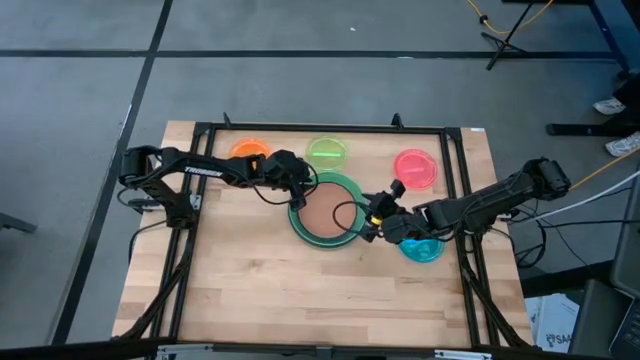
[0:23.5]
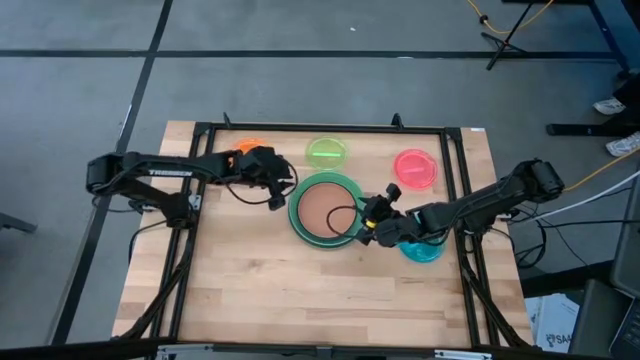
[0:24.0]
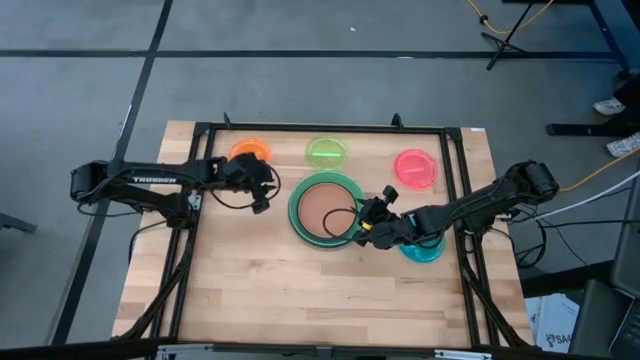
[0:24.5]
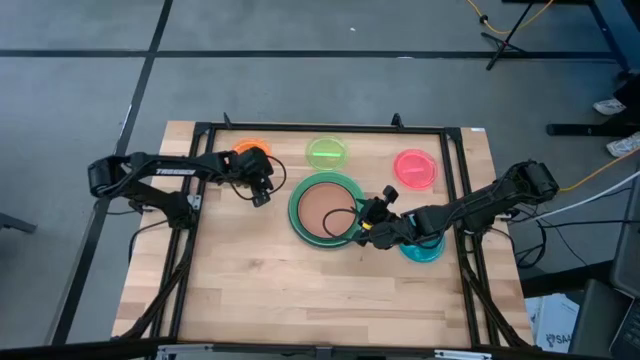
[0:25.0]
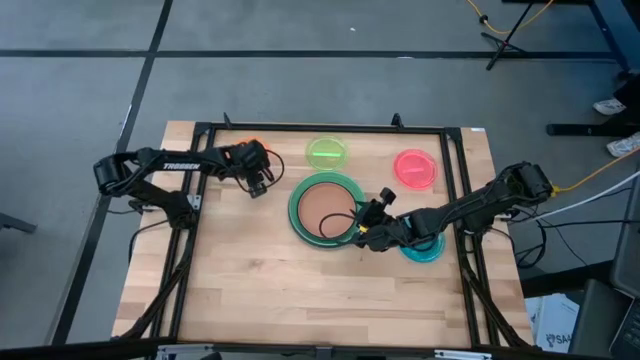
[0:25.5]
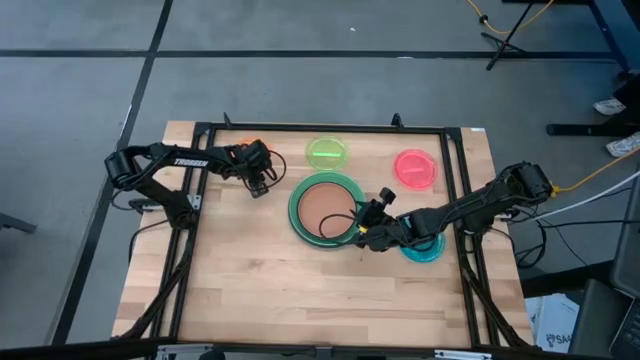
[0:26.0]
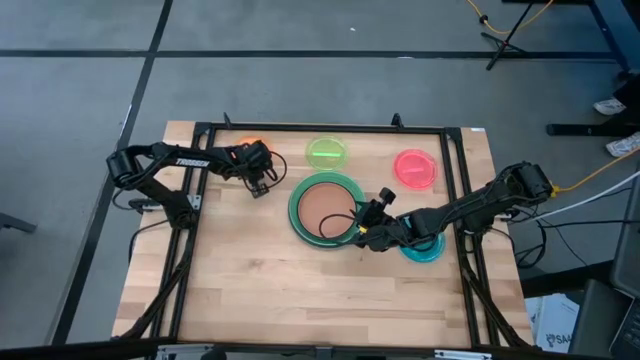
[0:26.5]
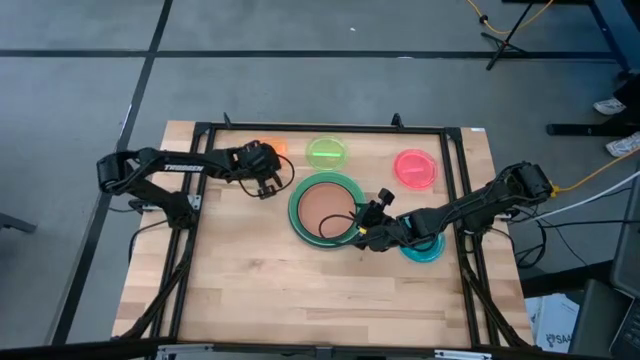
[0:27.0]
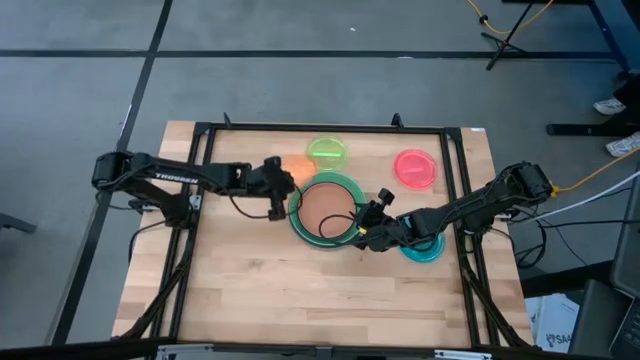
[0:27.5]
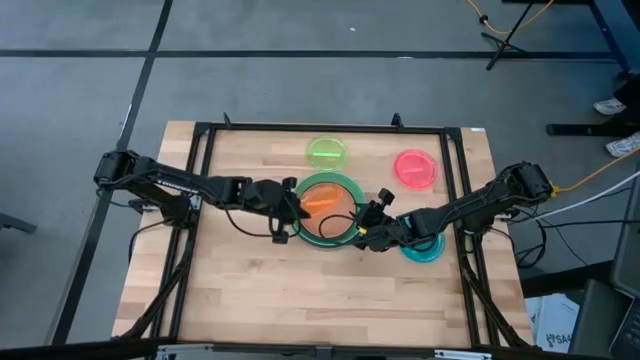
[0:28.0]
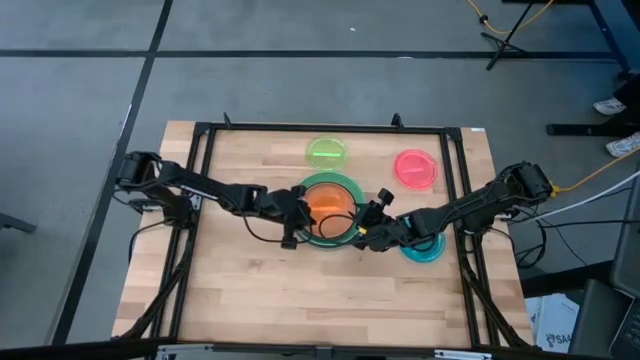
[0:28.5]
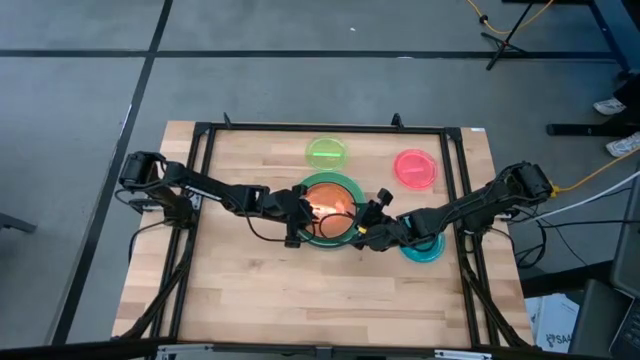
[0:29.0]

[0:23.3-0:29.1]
Task: Stack plastic plates
Stack the orange plate on top of the brown plate

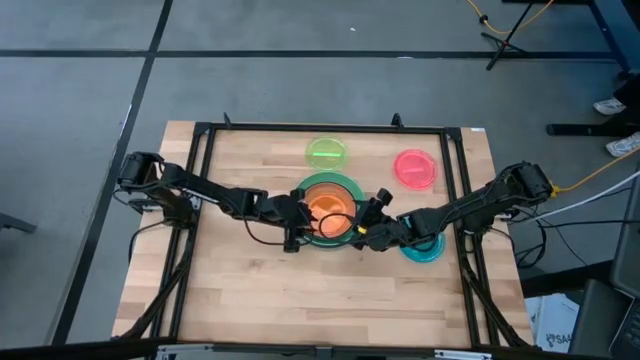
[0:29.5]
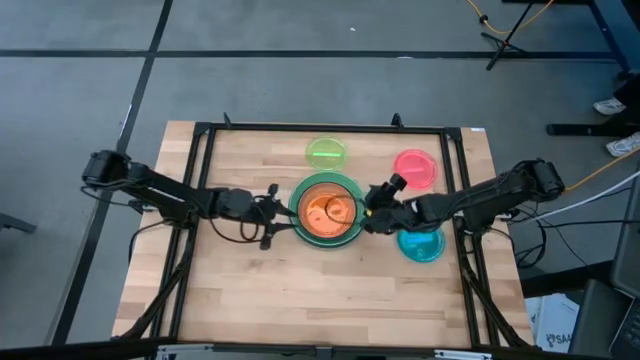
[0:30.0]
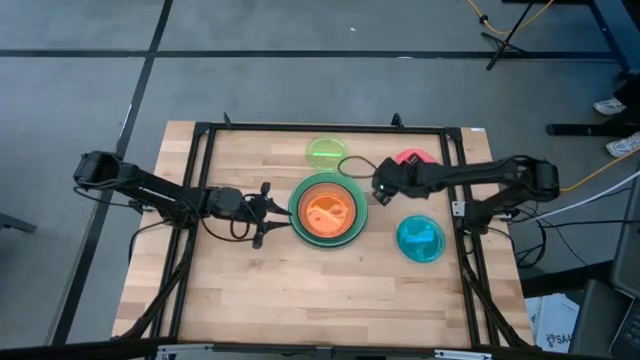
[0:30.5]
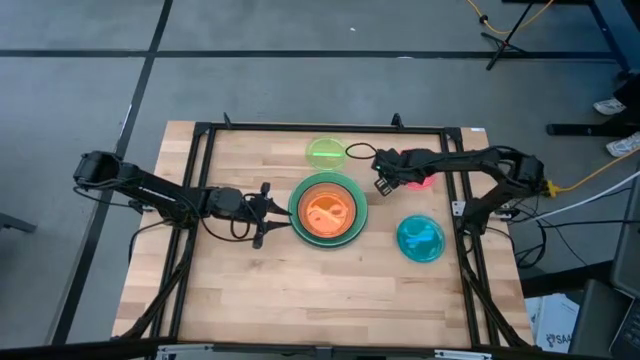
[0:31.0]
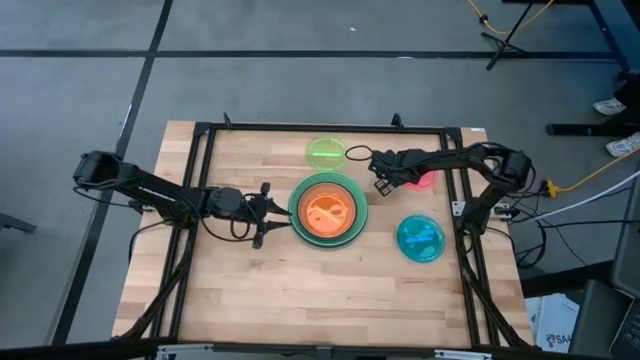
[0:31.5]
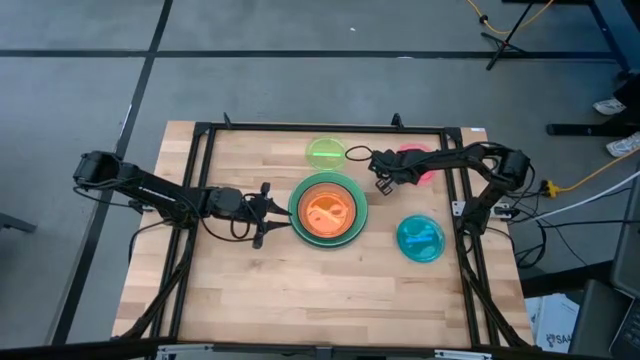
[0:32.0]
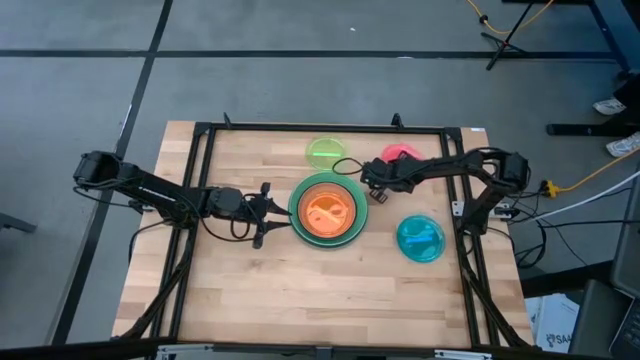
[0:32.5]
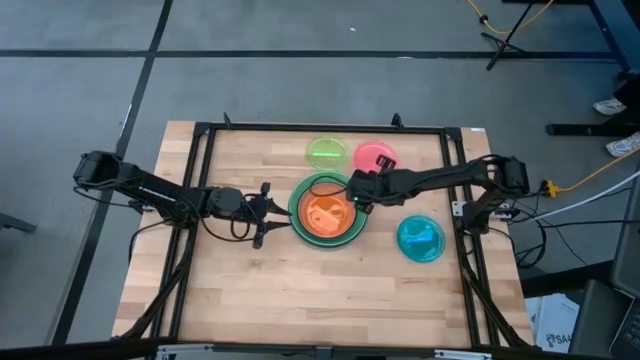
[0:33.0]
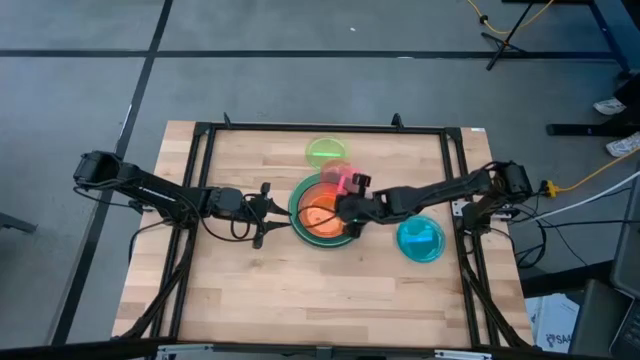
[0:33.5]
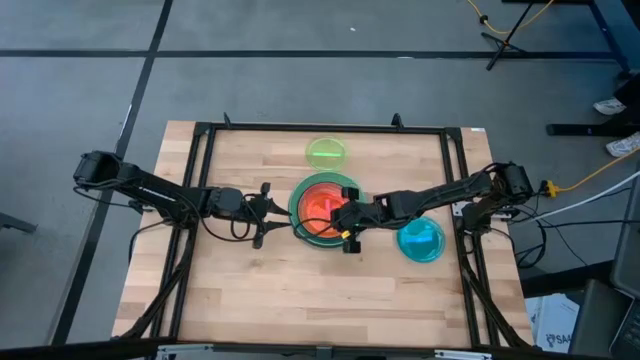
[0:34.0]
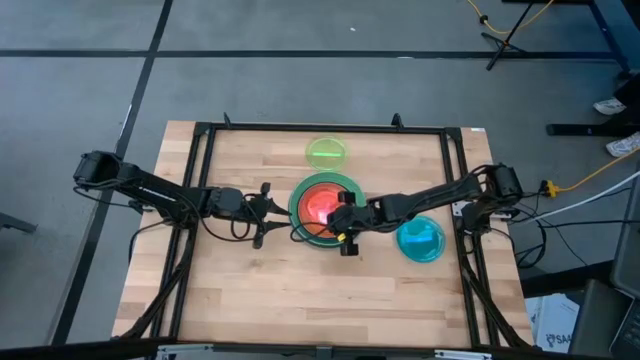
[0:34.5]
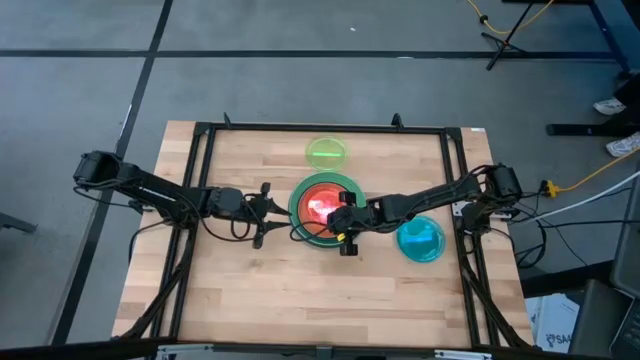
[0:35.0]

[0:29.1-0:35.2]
Stack the pink plate on top of the orange plate

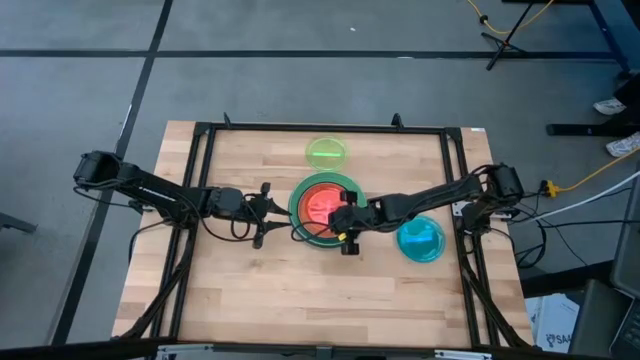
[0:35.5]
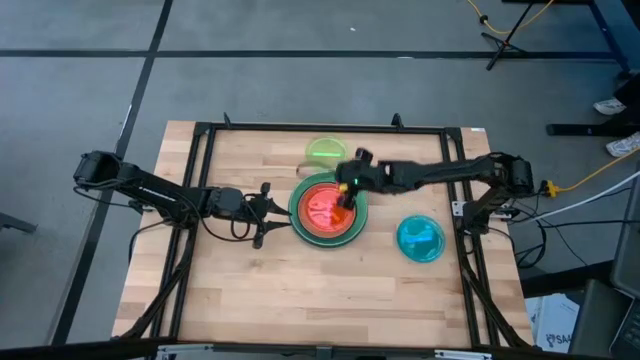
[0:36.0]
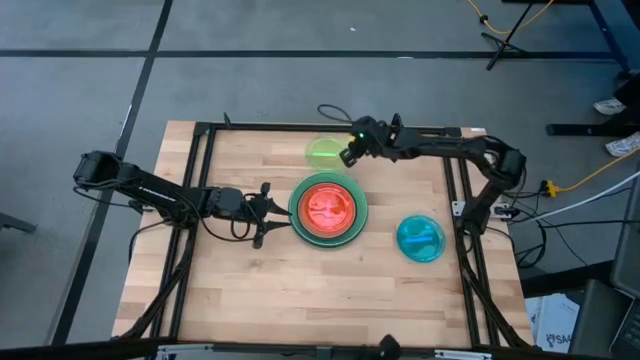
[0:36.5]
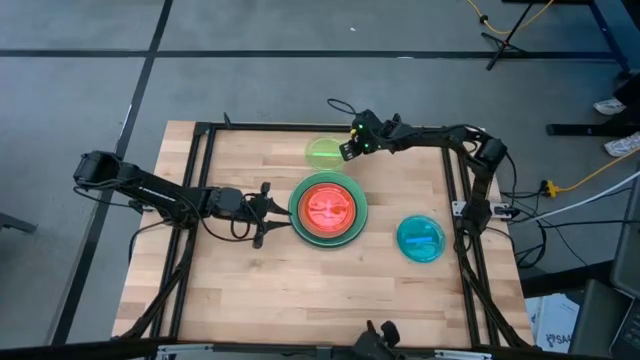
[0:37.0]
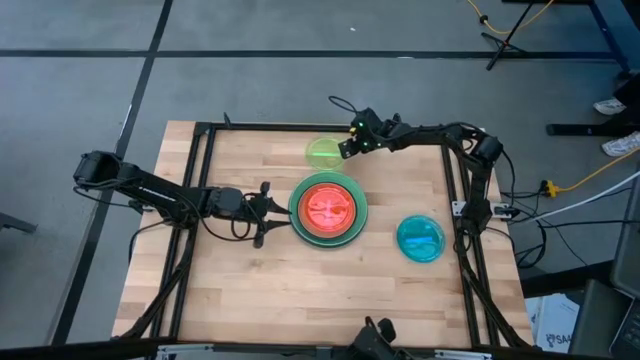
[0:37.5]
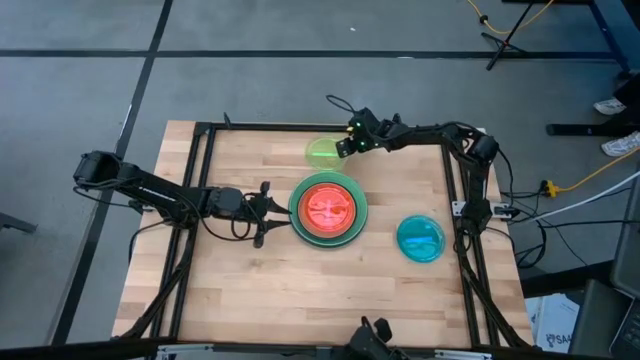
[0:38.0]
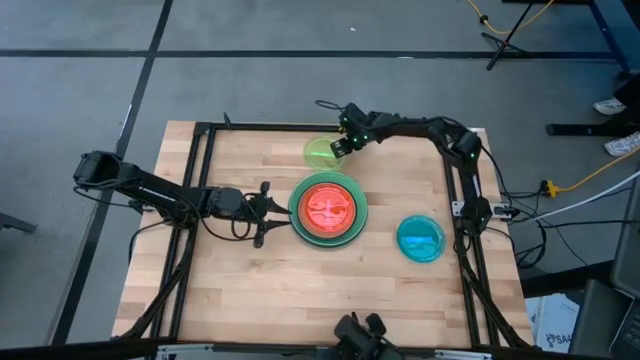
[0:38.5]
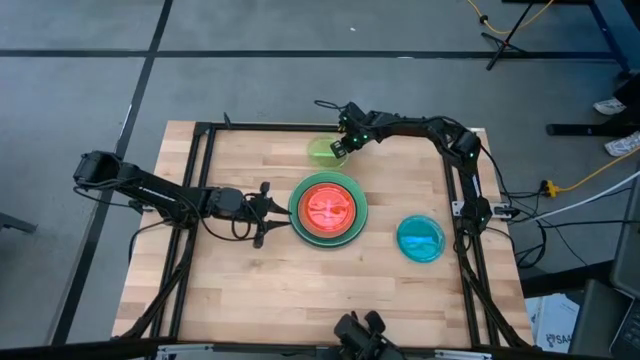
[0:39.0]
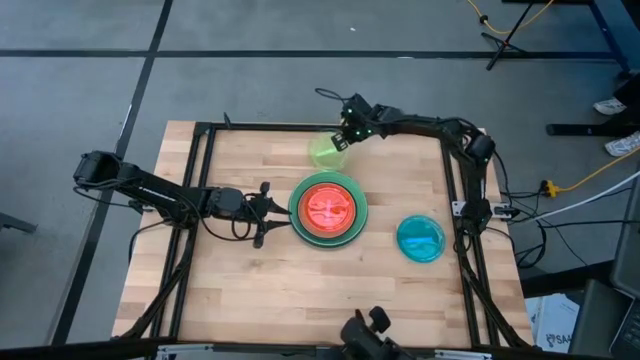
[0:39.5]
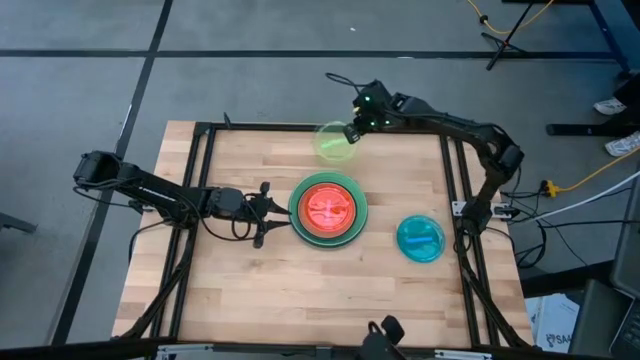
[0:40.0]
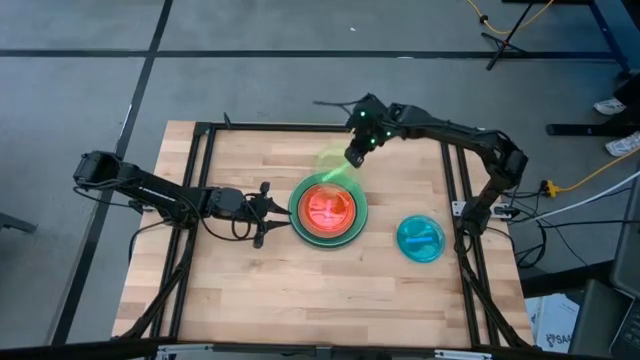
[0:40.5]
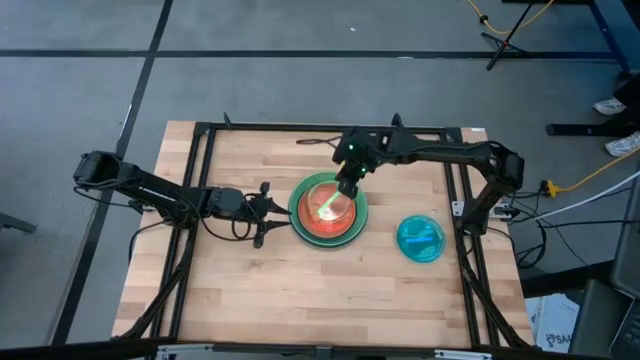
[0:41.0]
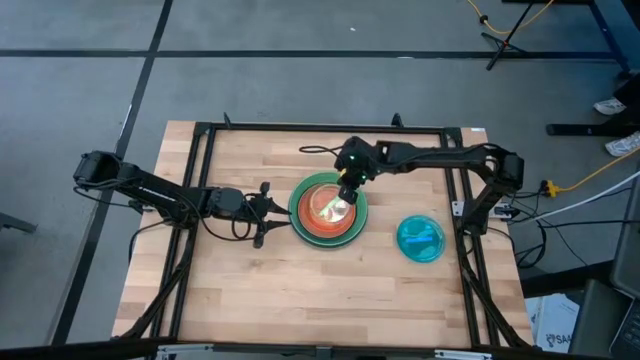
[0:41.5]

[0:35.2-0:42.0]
Stack the green plate on top of the pink plate

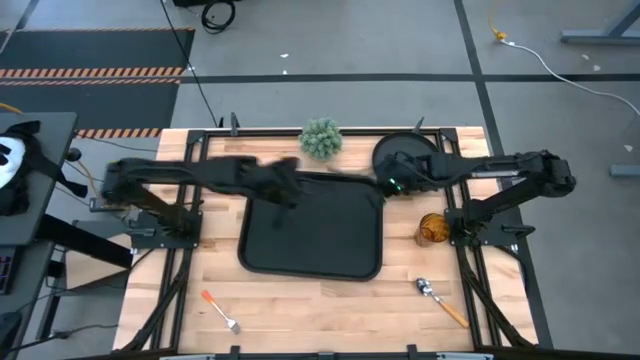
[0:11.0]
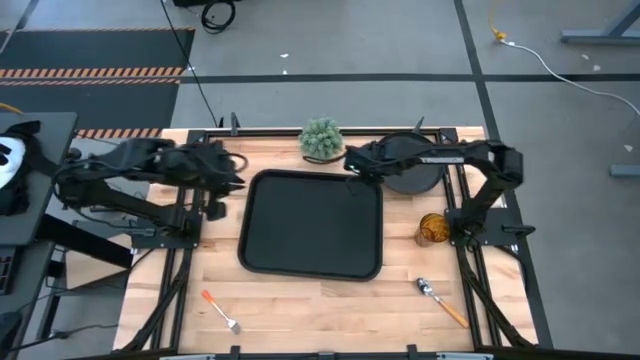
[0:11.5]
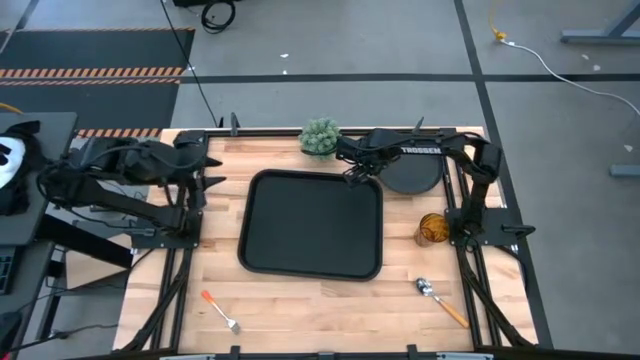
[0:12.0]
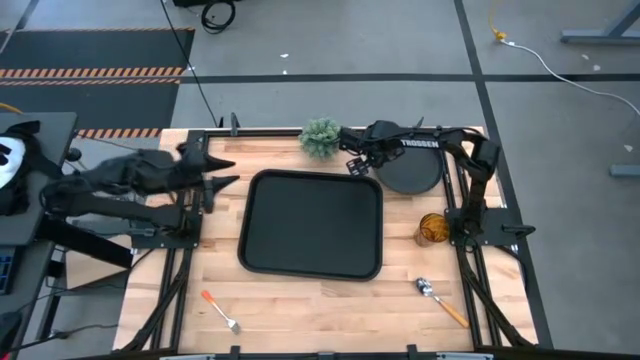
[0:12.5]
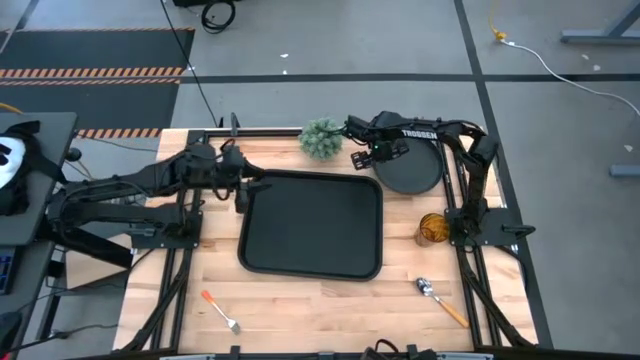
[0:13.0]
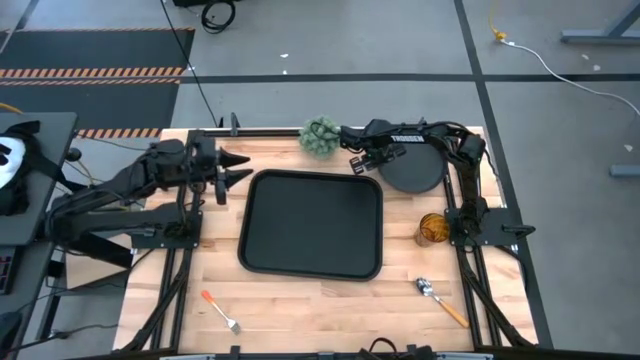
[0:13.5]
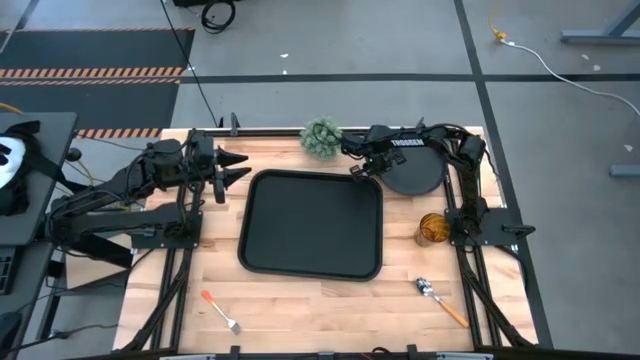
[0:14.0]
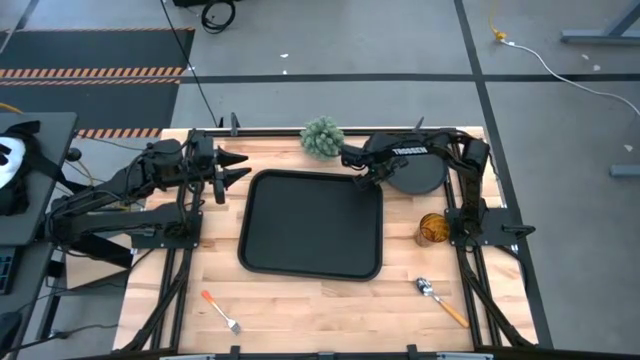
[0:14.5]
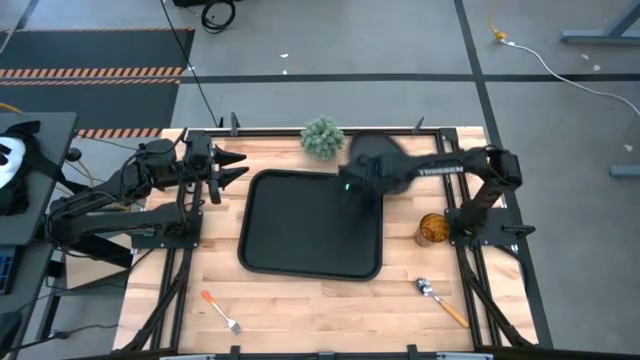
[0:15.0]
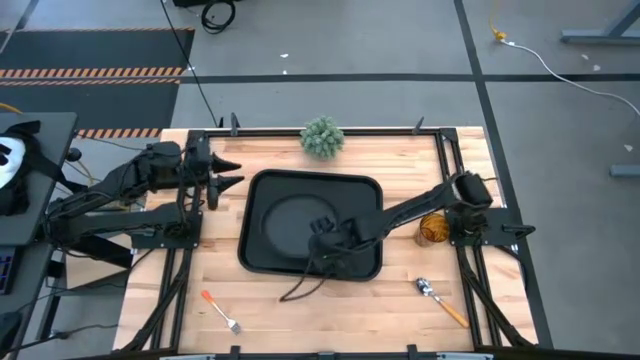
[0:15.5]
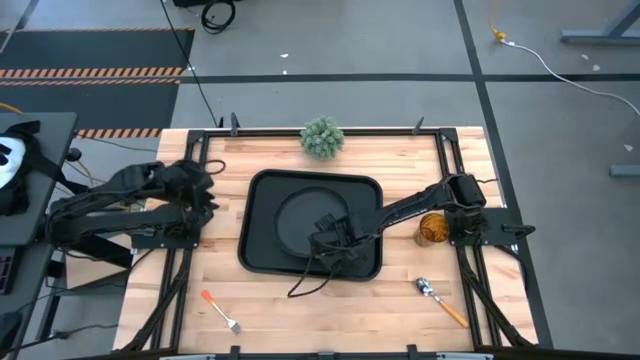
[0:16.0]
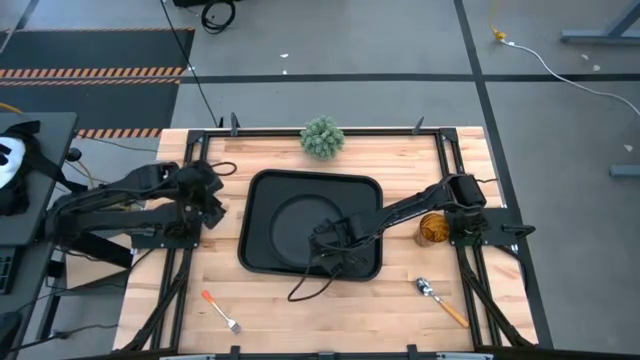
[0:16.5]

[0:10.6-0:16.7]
Task: Pick and place plate/cup/fork/spoon on tray
Put the black plate on the black serving tray
